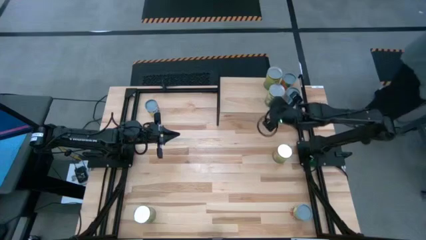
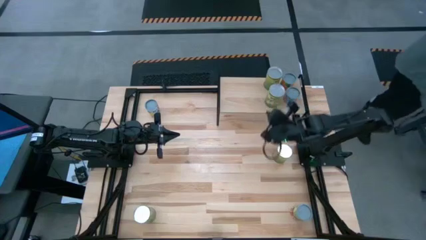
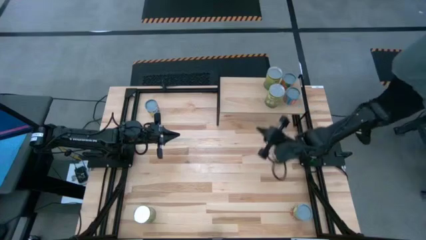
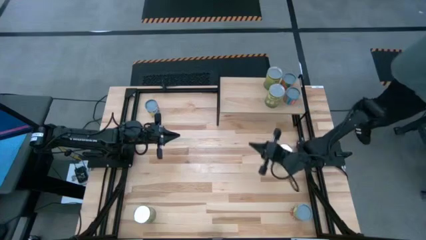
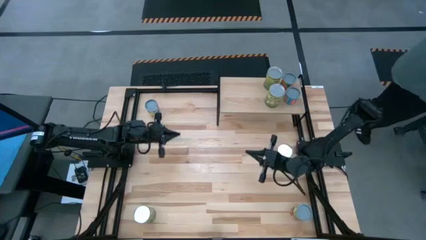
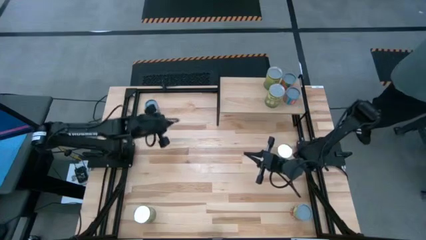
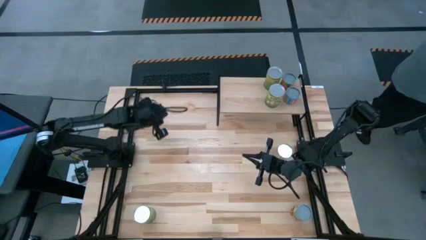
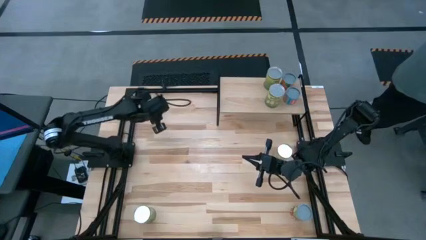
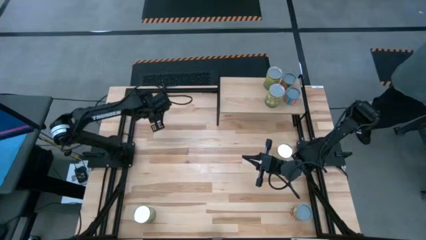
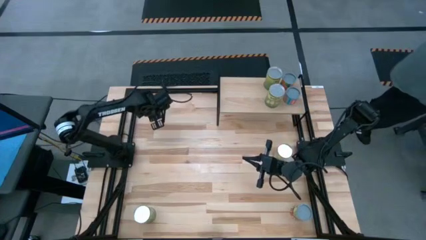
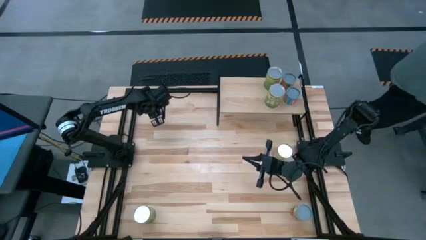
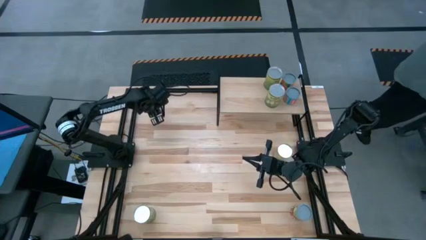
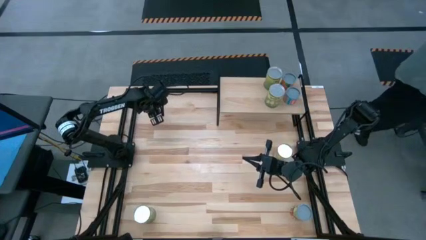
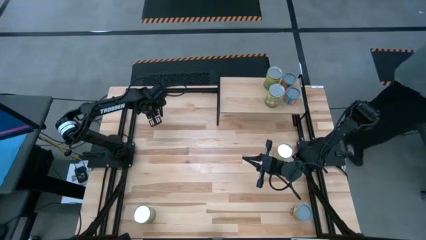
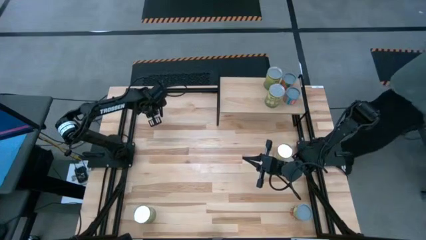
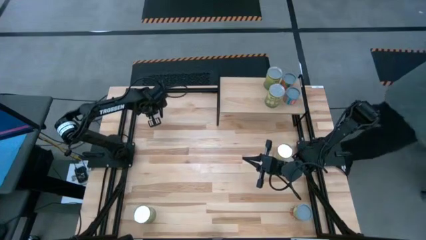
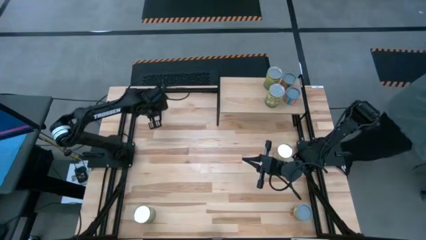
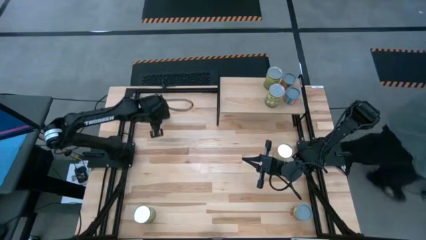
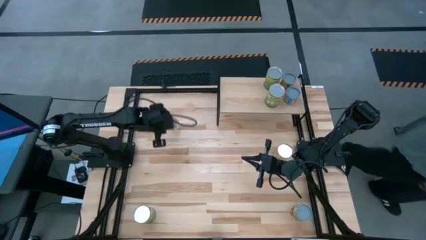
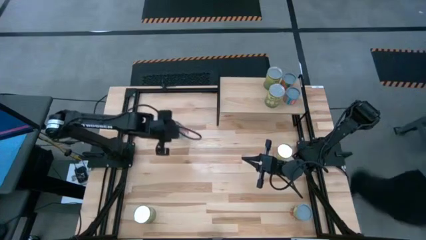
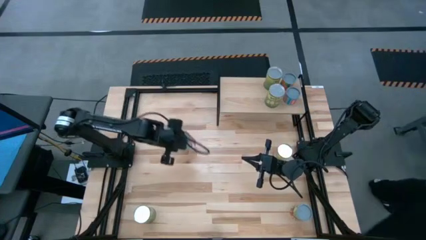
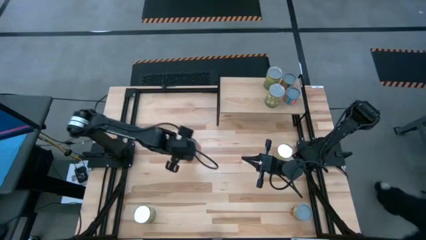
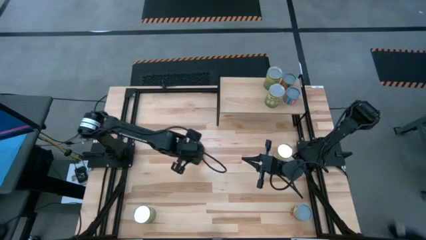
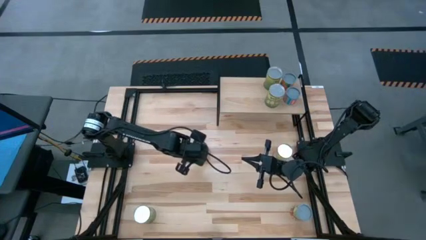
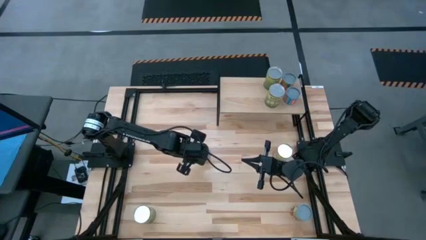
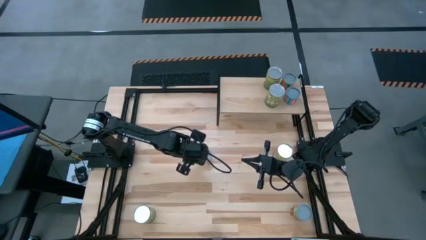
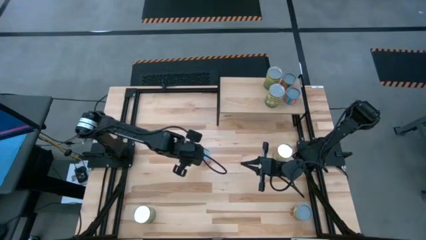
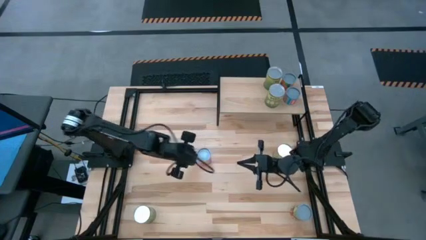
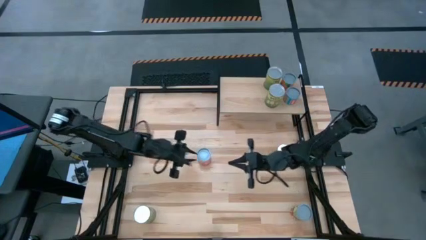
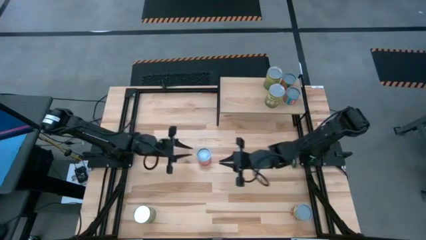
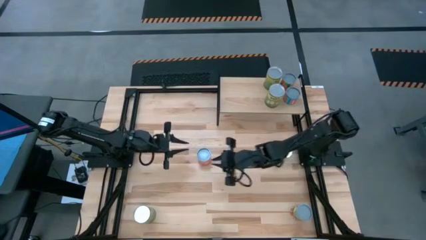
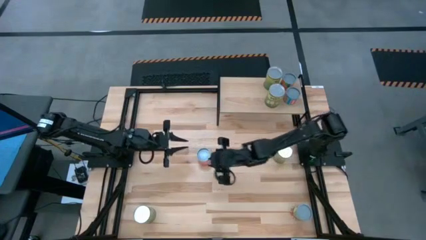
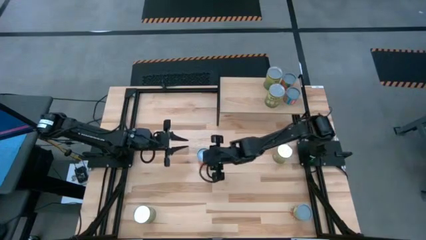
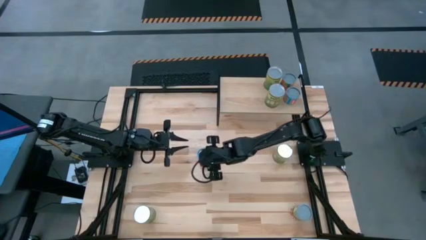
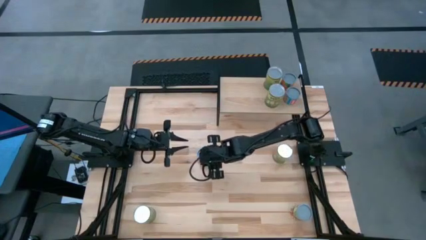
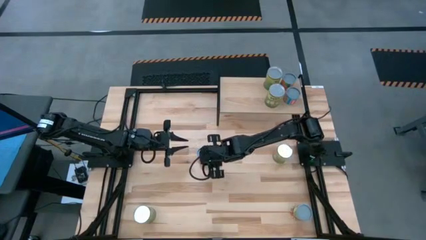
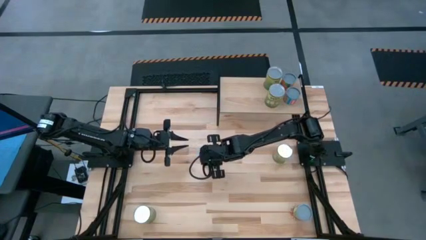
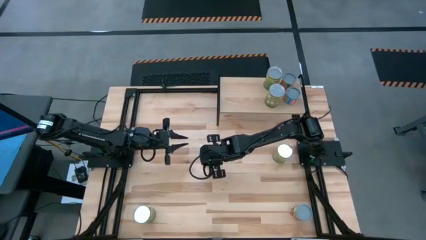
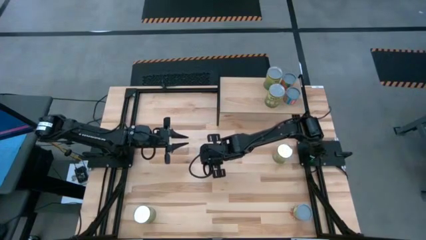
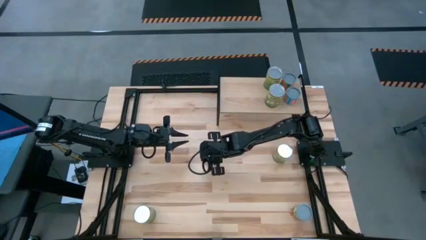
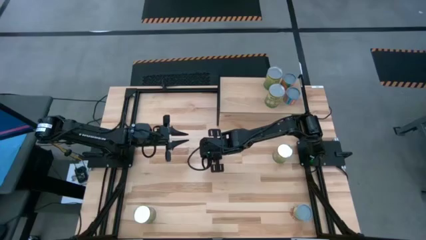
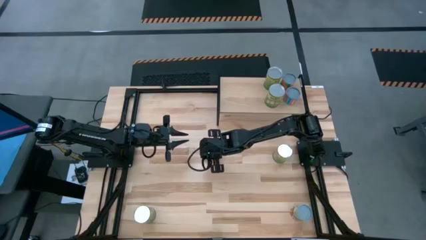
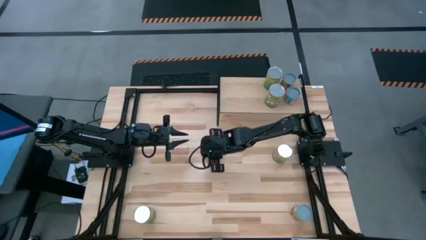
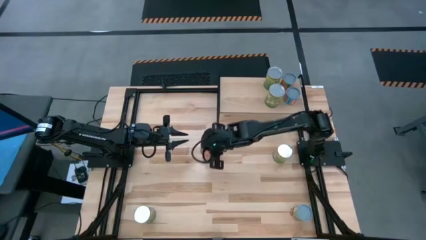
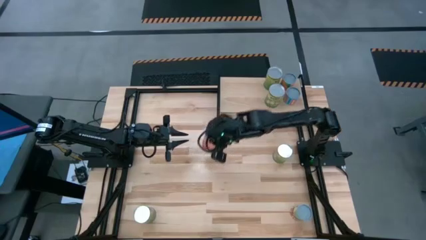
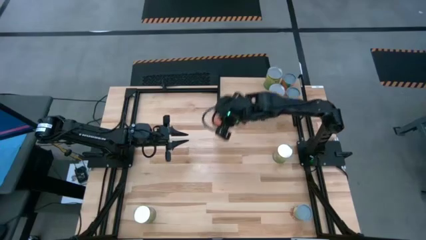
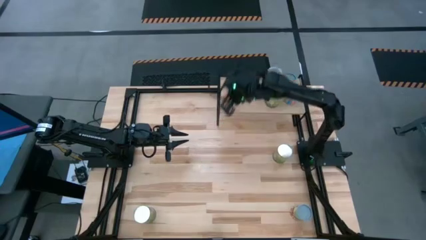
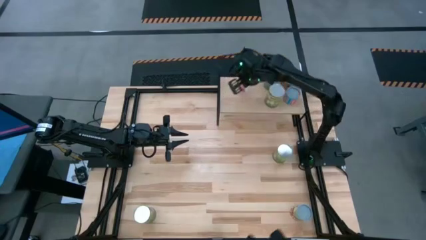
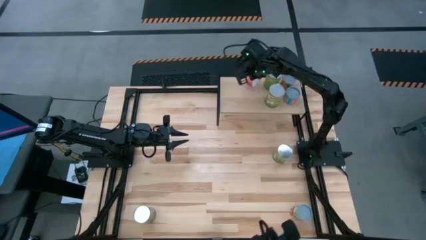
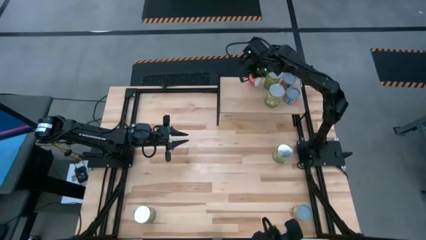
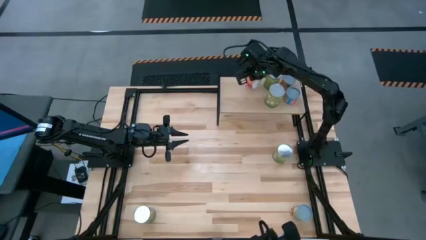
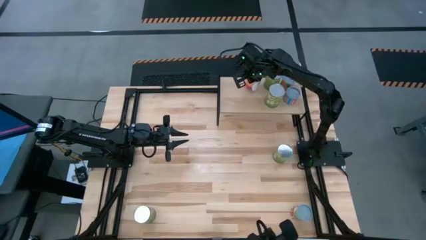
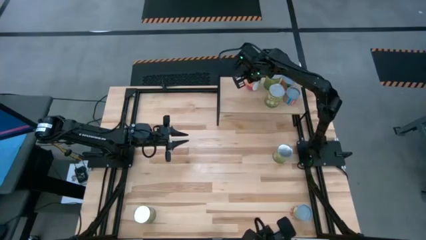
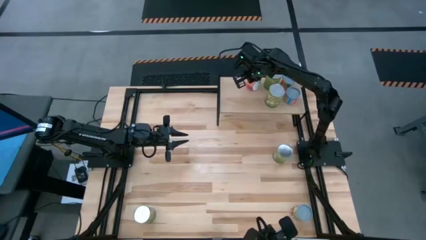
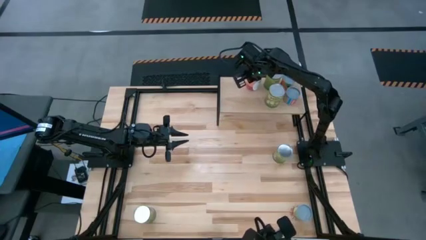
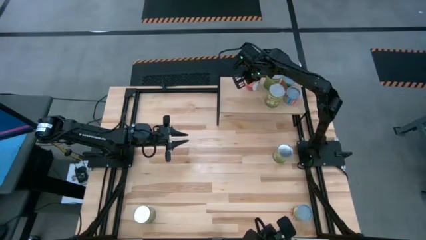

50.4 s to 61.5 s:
Task: Pick and place cans onto a shelf
Put the canned mixed fruits on the shelf

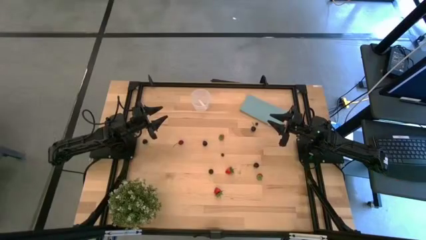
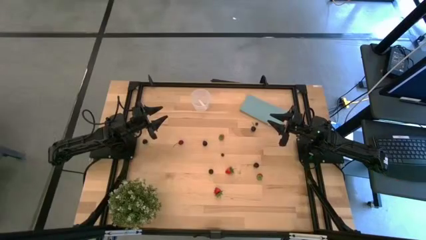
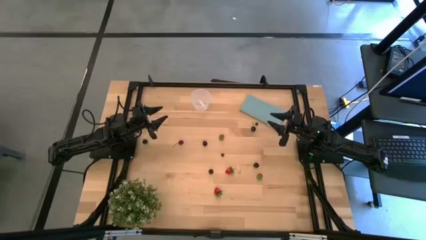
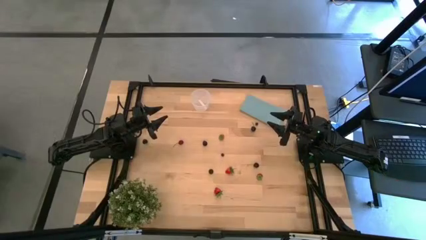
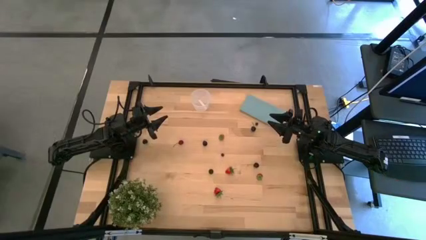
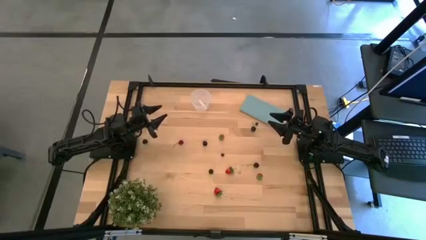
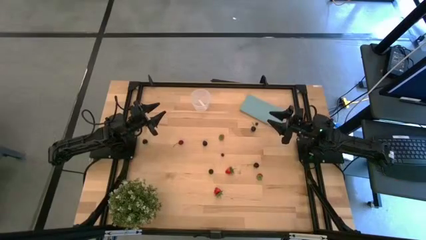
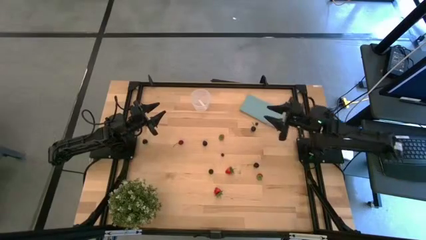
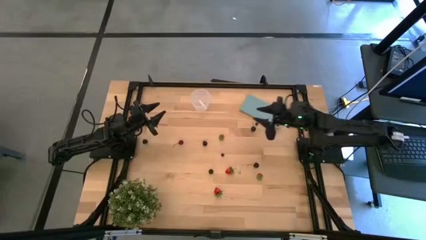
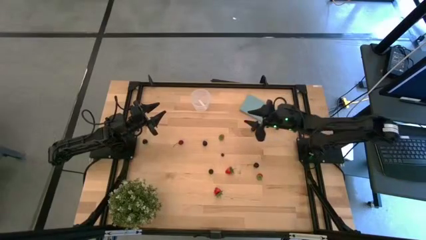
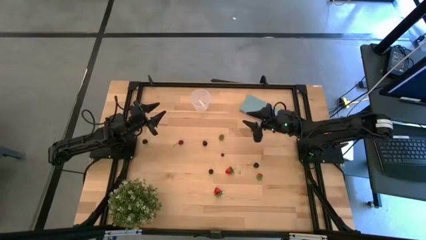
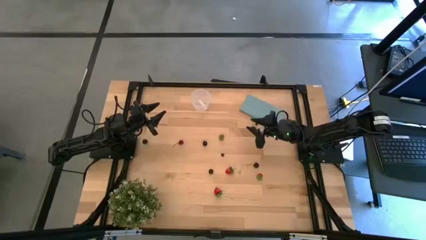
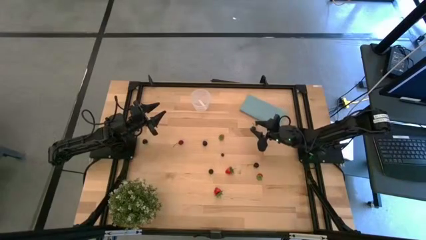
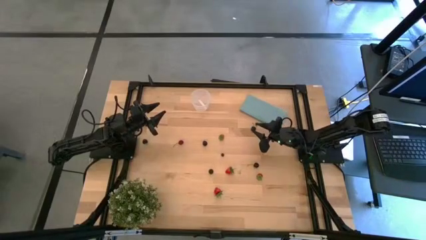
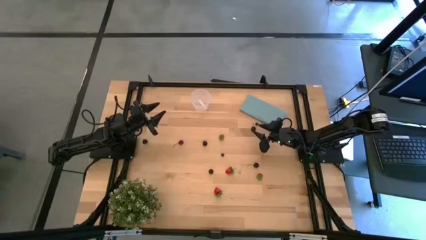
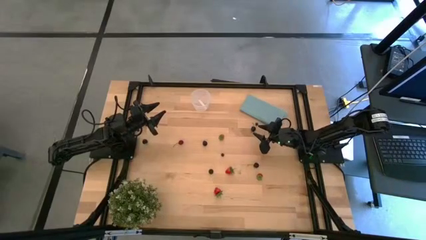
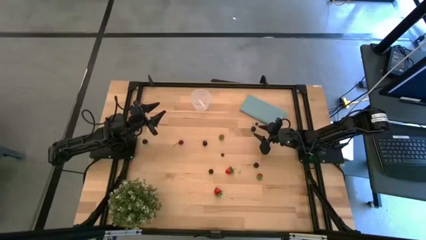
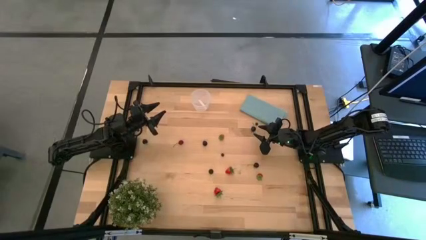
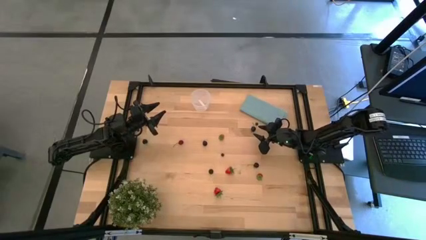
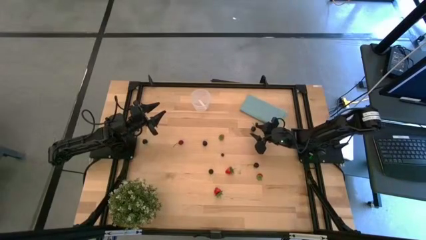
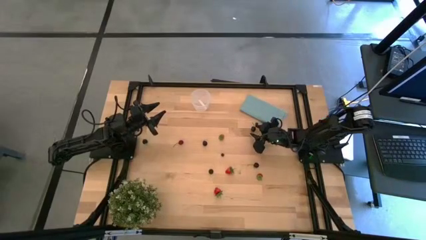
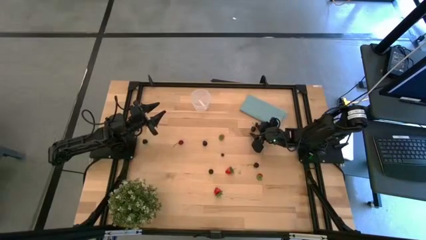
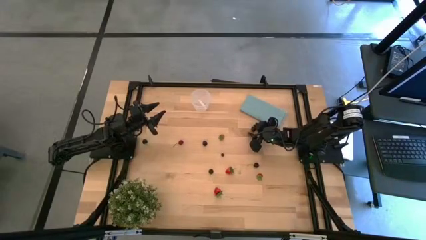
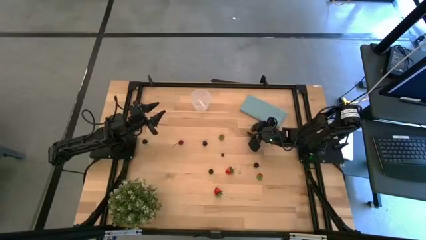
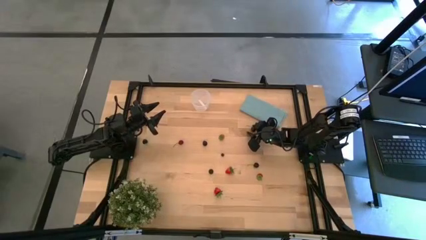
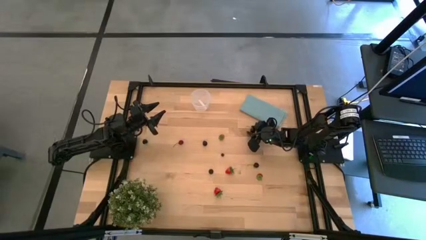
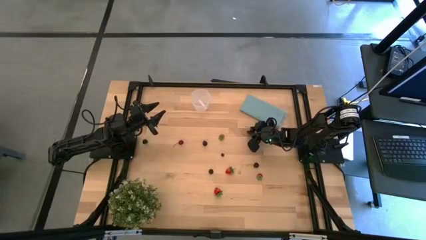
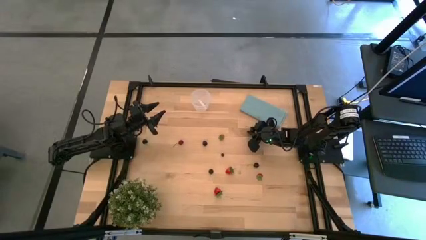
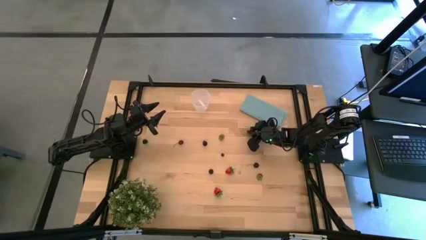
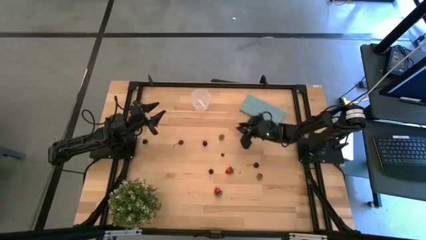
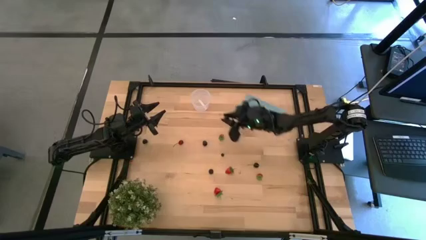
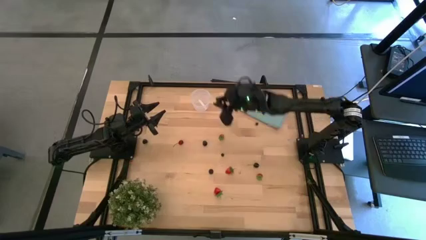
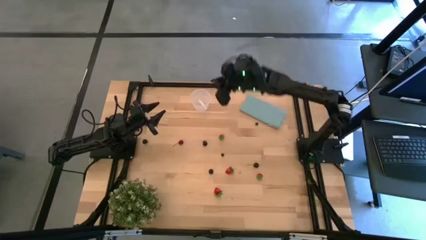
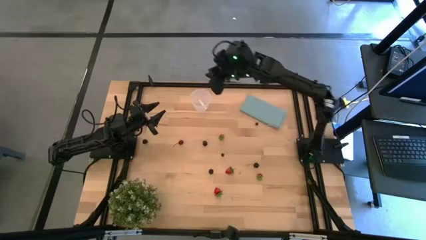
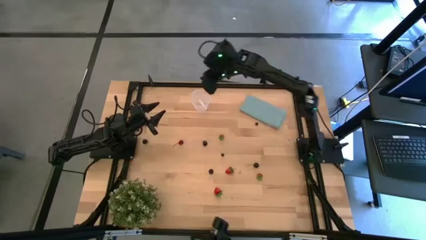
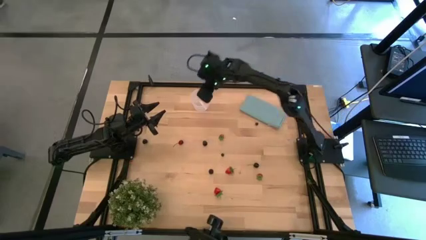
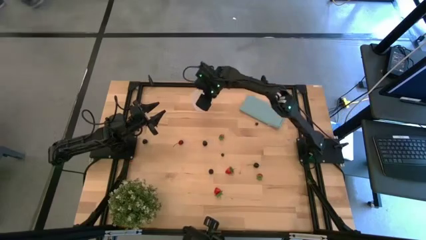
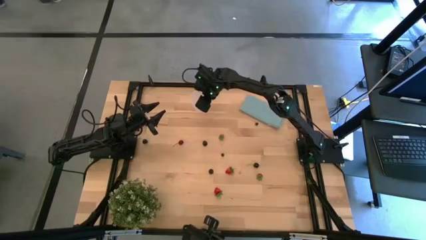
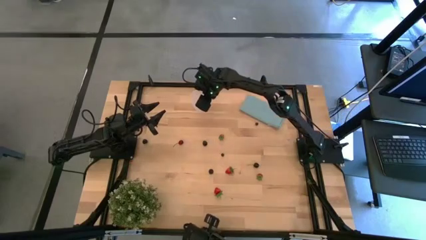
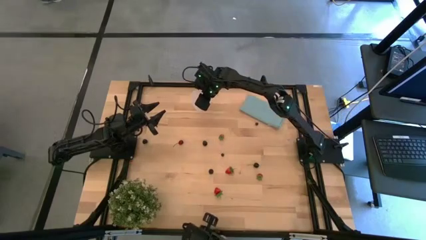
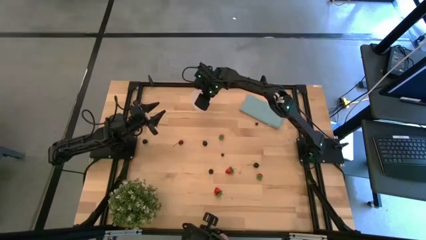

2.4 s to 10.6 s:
Task: Pick and placing Produce into tupperware
Put the top black cherry into the container
